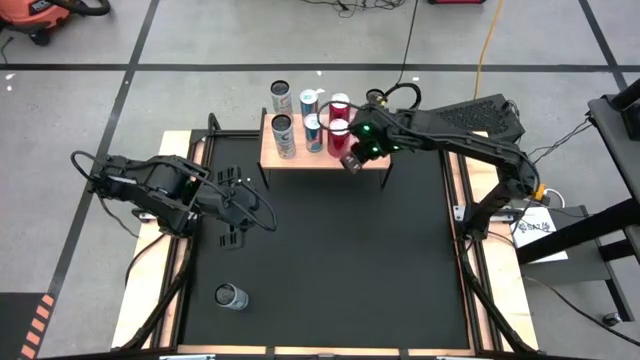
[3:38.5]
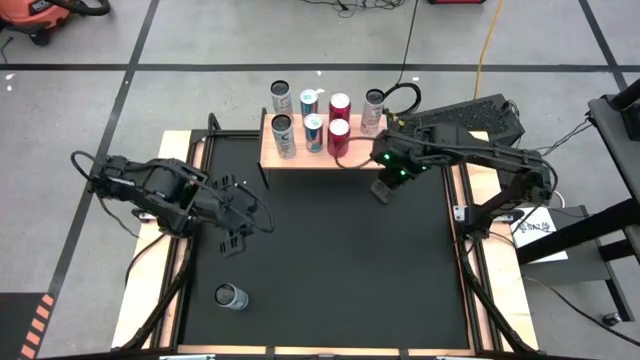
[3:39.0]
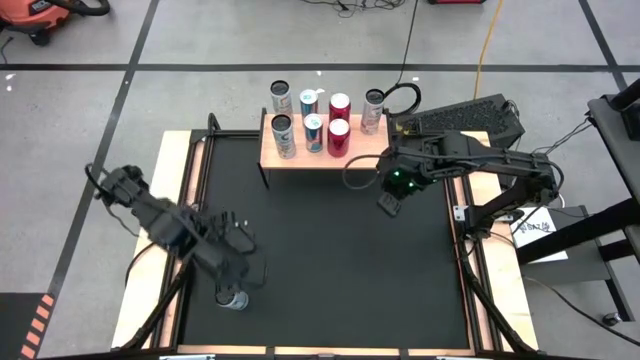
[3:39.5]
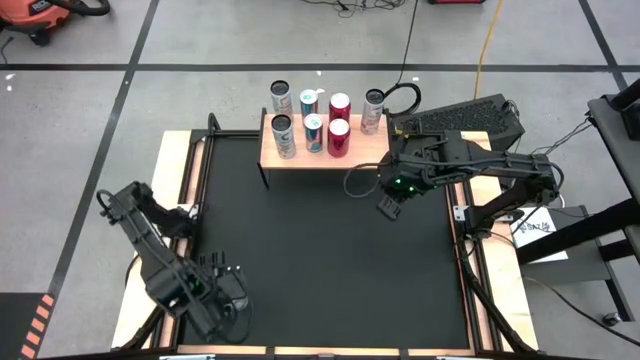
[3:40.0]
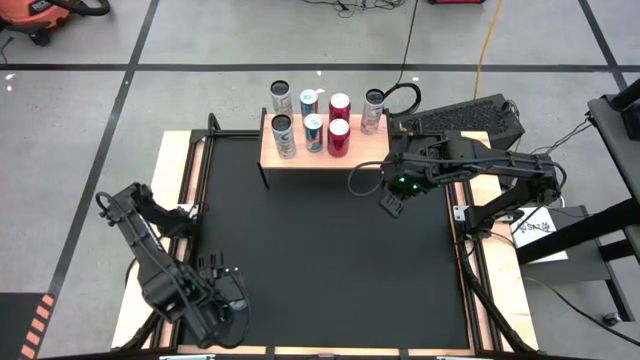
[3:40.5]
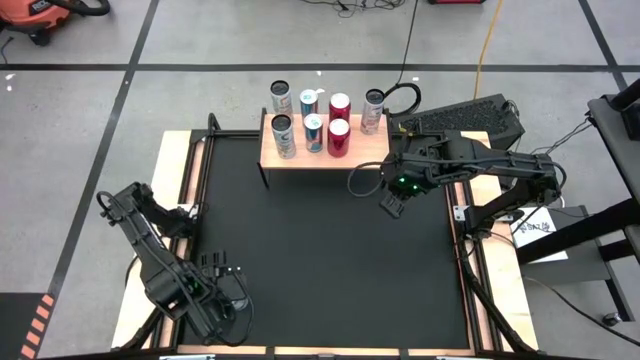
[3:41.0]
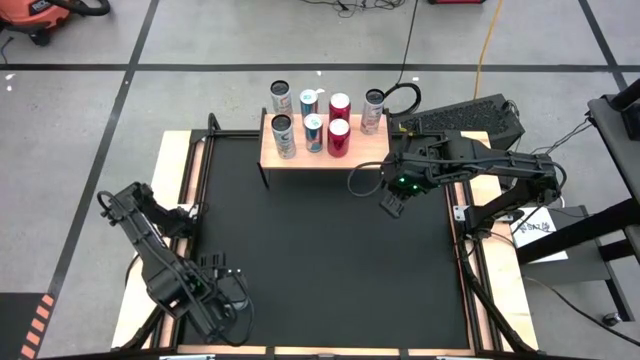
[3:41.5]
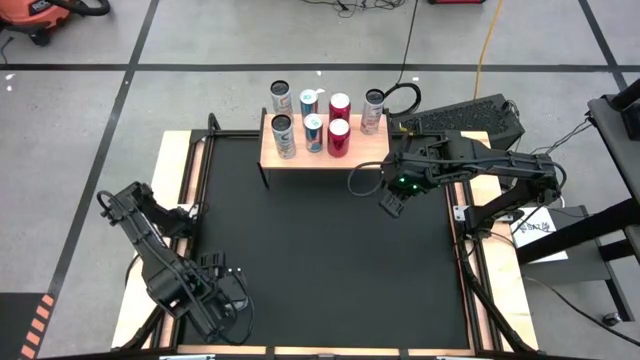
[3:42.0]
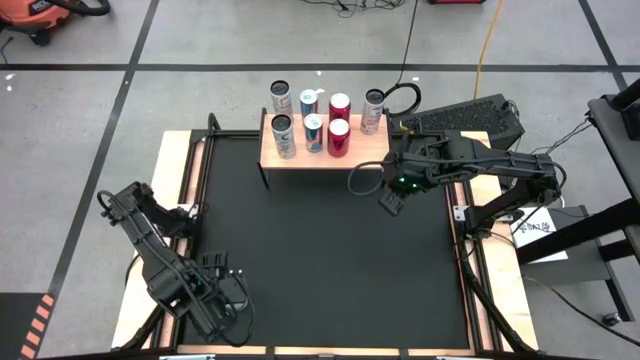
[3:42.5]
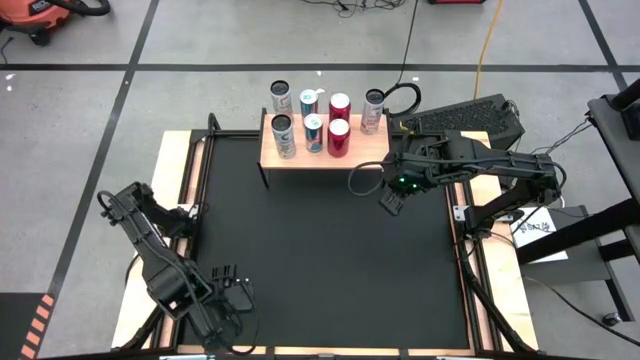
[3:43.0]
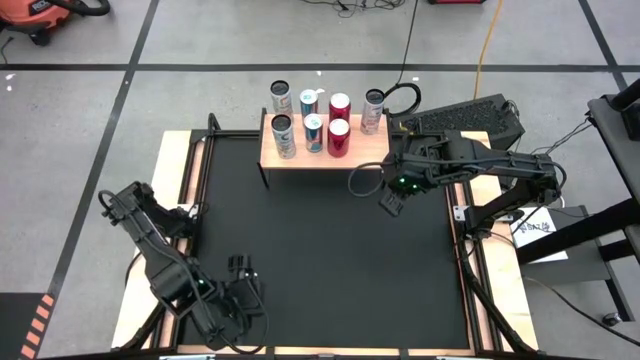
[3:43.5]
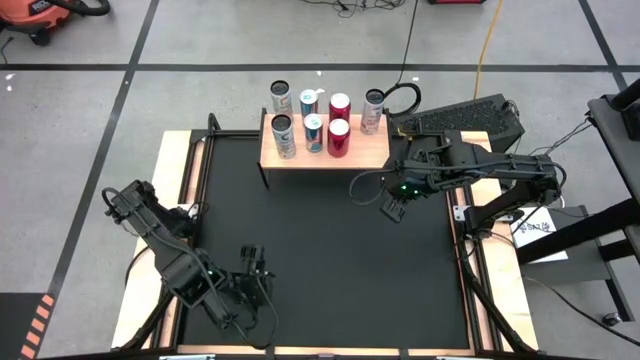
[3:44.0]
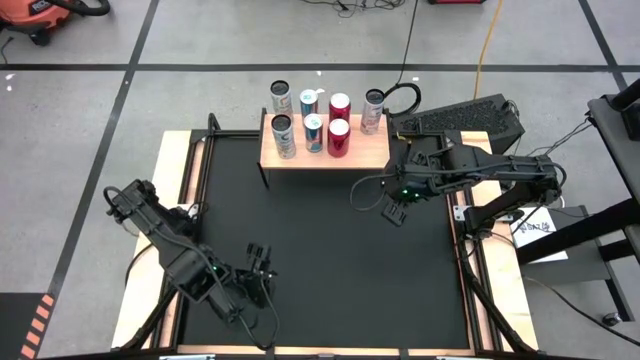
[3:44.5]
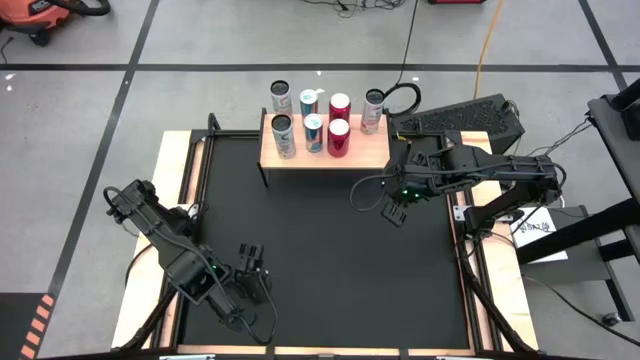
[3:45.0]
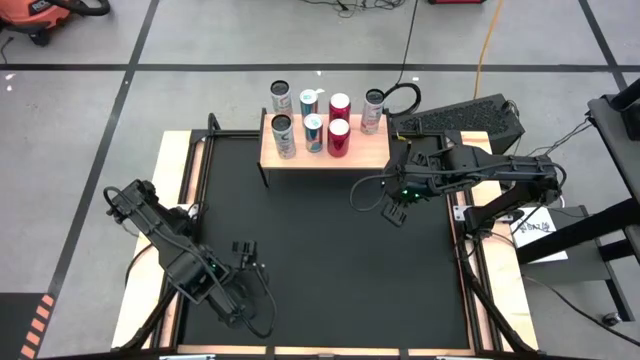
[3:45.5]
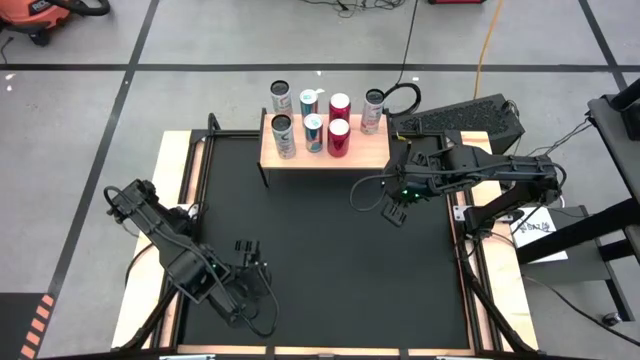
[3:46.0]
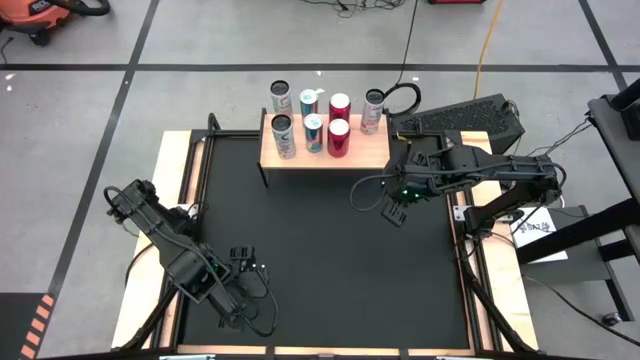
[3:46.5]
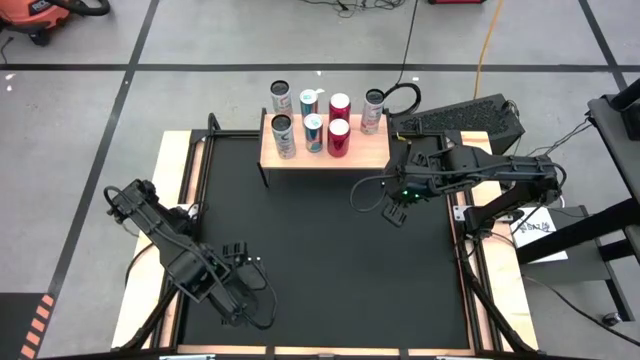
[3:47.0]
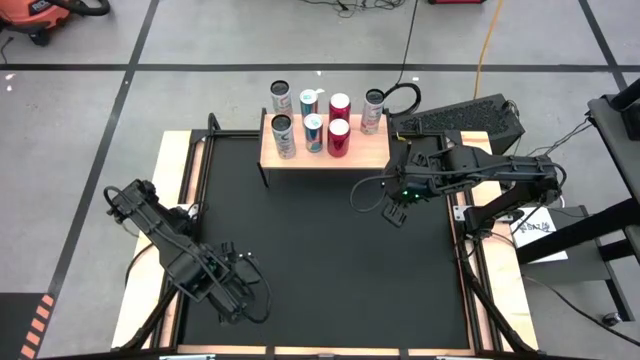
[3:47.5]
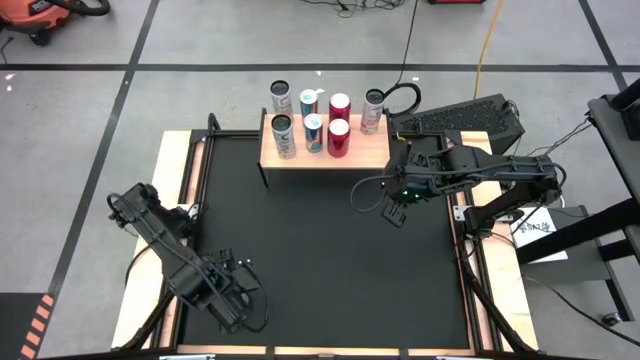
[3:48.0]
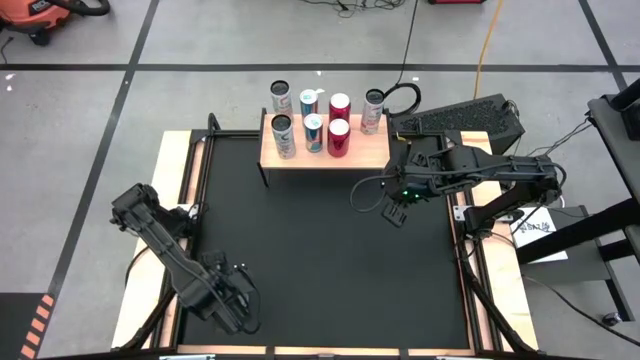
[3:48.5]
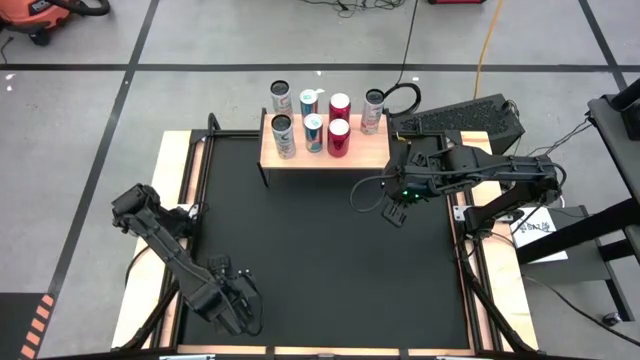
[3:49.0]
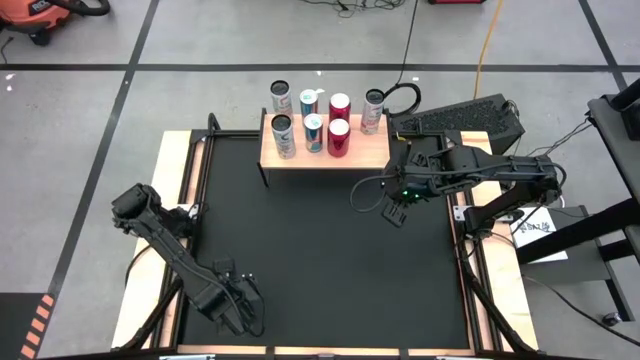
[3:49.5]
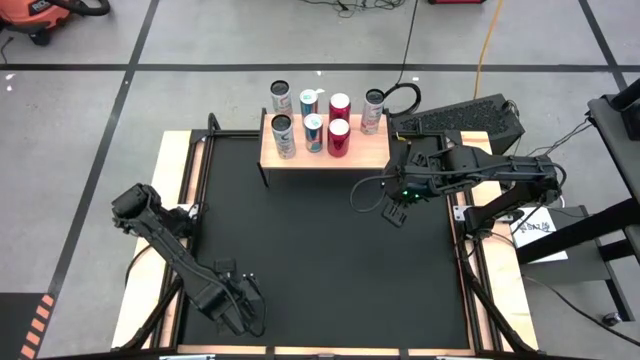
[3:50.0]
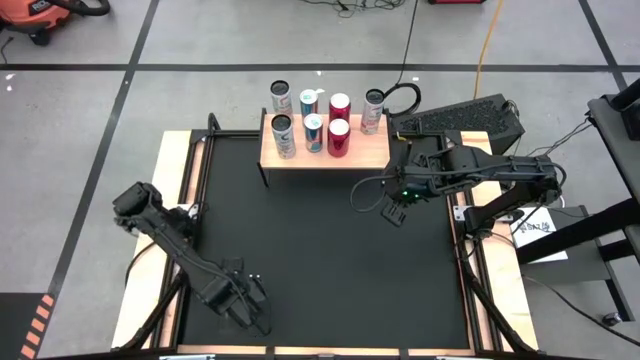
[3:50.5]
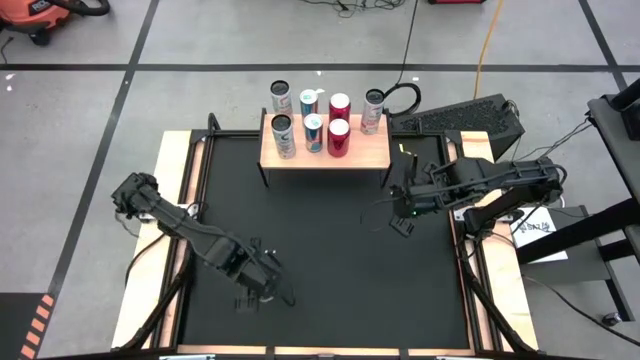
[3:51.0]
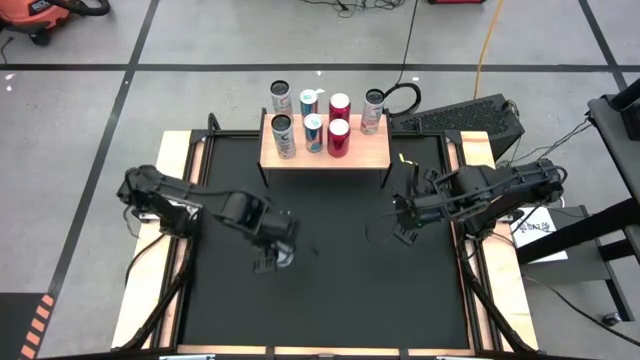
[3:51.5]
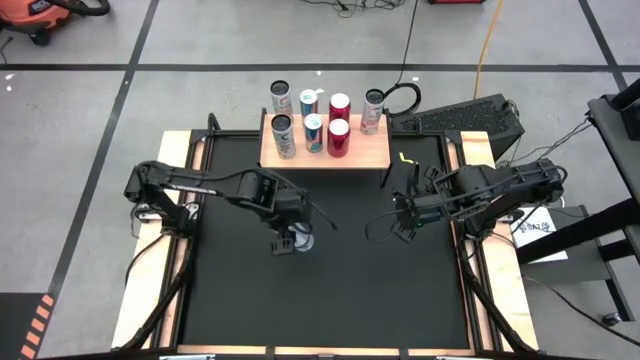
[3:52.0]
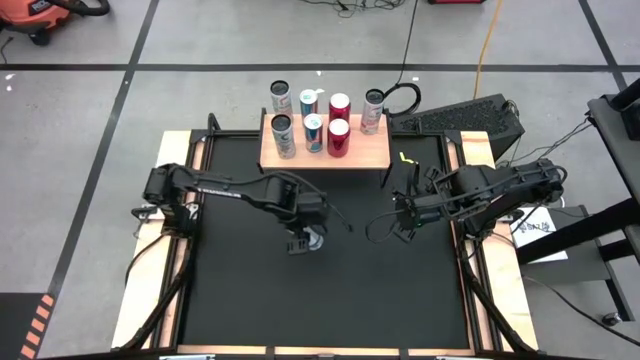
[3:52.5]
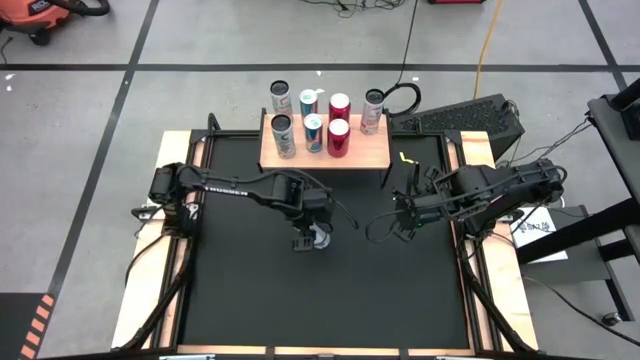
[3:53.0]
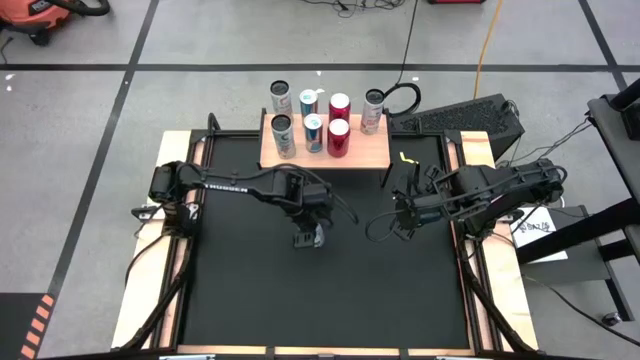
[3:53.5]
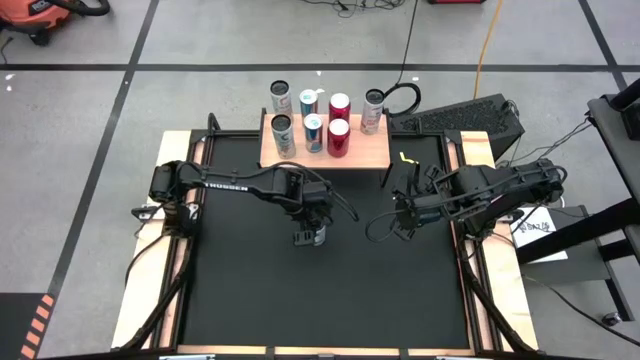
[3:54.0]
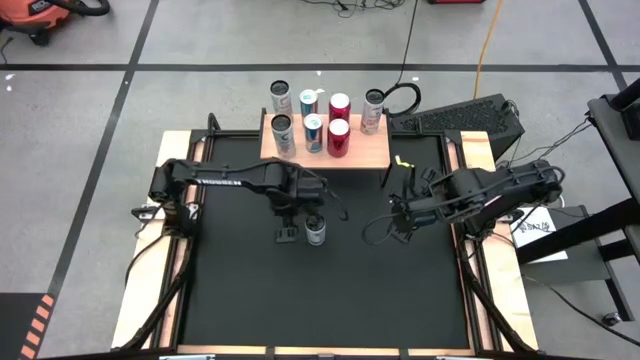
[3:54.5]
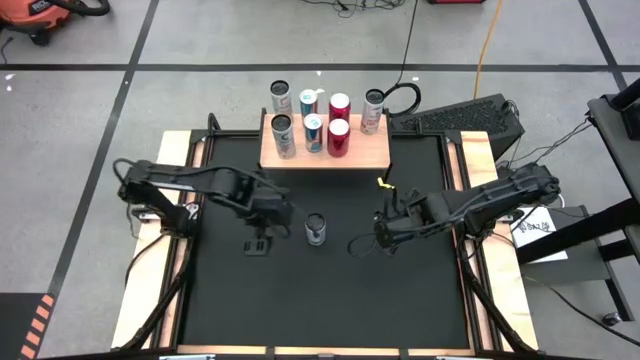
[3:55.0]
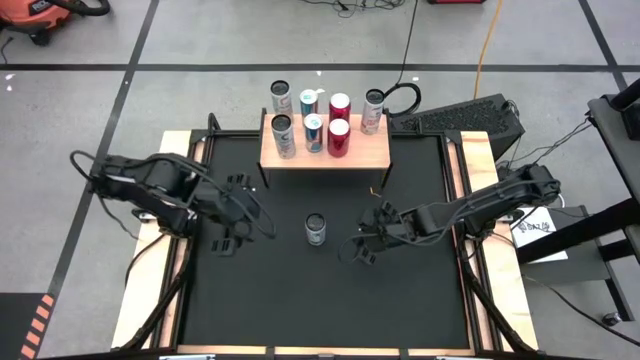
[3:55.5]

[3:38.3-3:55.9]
Task: Place canned beverage on shelf
Put the white-pink soda can on the shelf

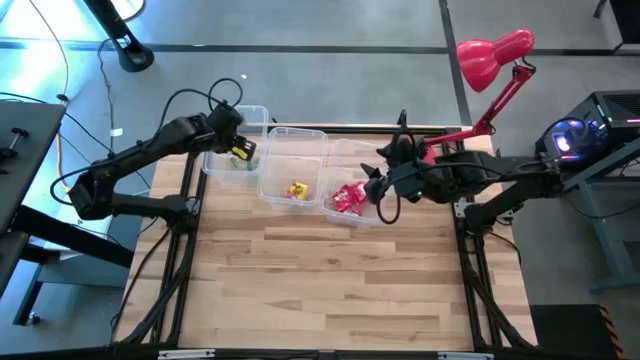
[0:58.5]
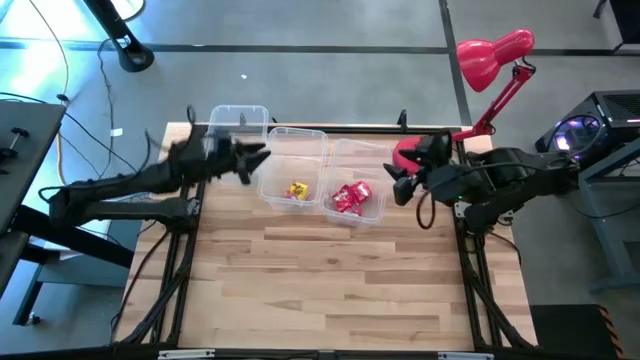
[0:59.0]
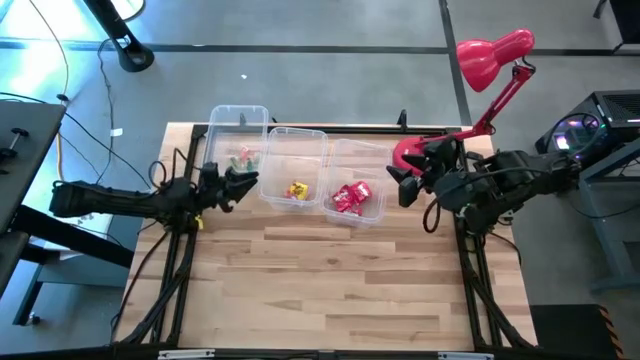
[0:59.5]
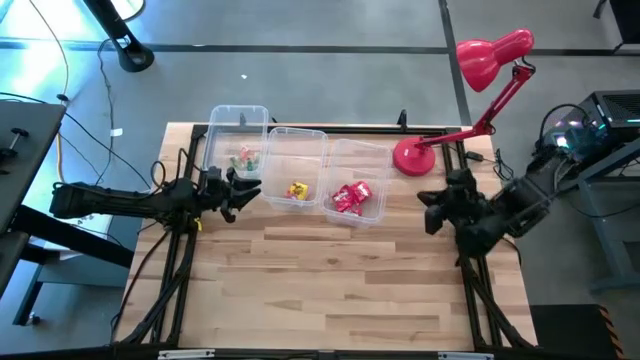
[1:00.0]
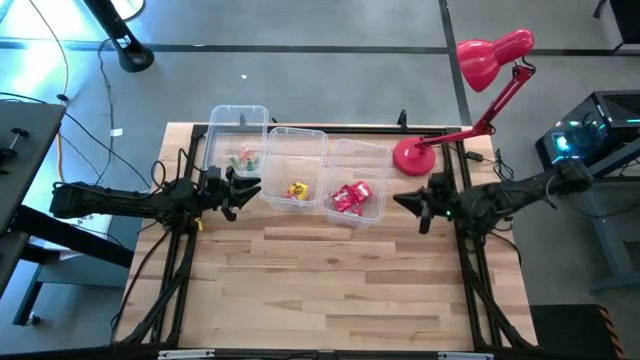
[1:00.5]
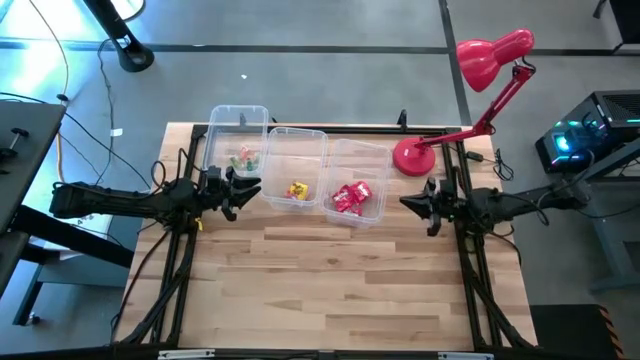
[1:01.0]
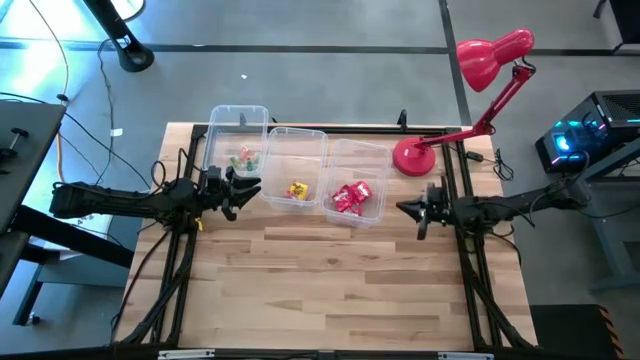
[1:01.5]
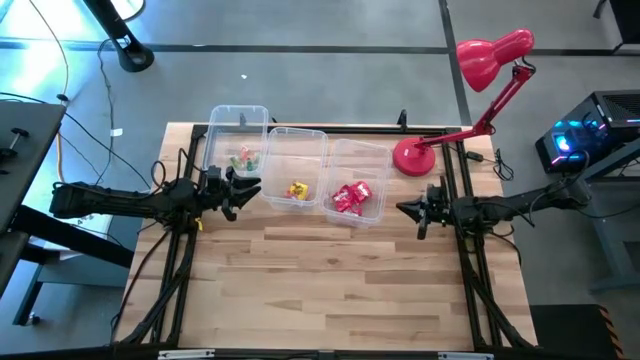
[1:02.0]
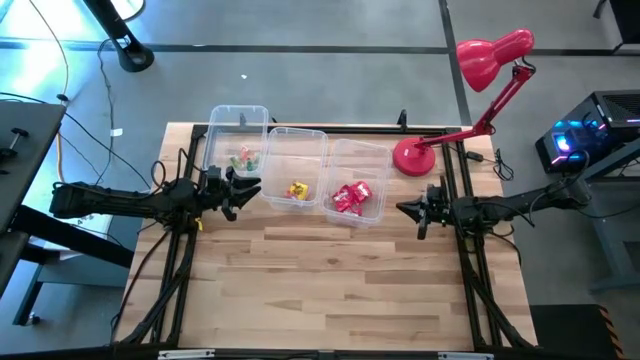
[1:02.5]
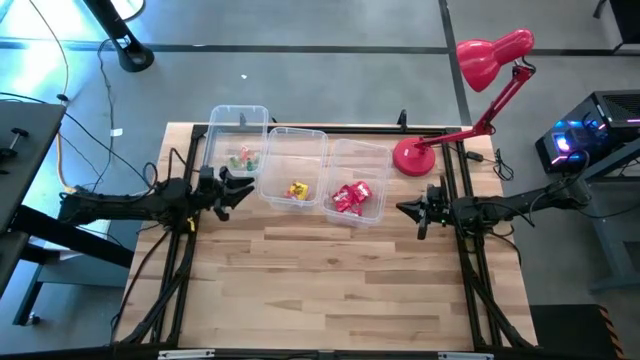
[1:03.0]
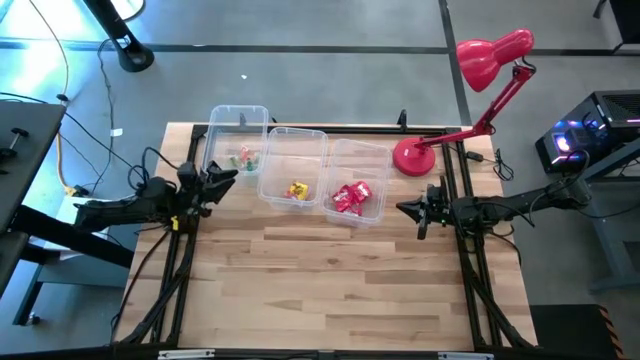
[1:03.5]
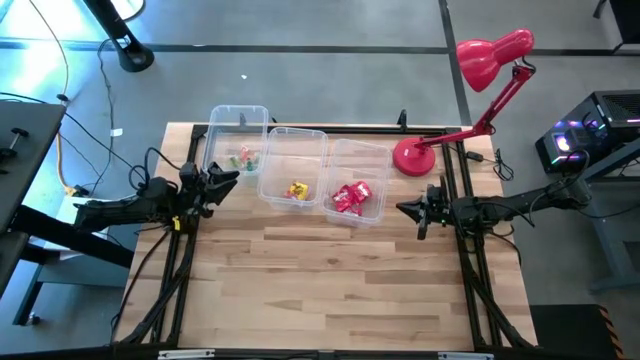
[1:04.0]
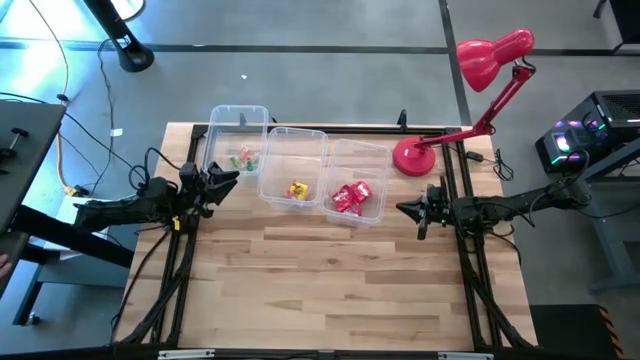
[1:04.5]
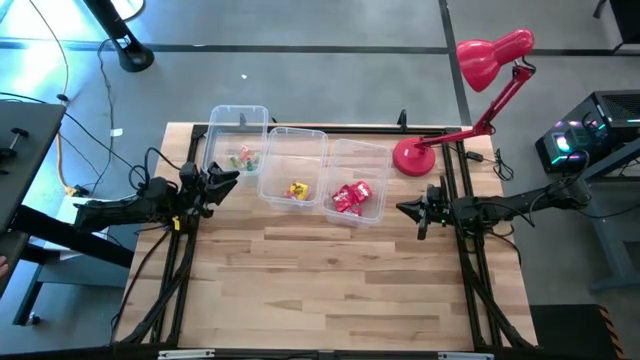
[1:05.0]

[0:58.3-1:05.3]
Task: Sort candy
Return to Home Position
